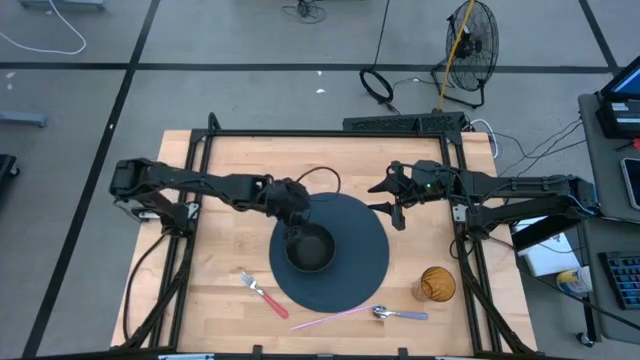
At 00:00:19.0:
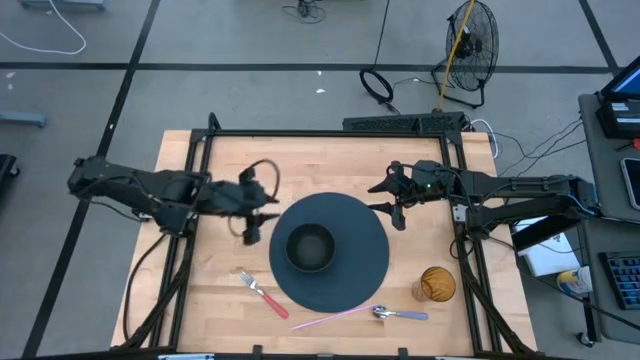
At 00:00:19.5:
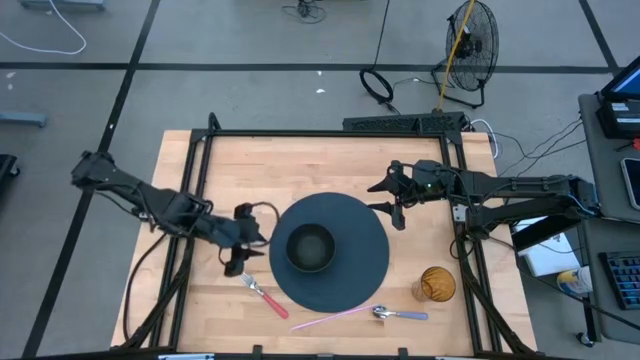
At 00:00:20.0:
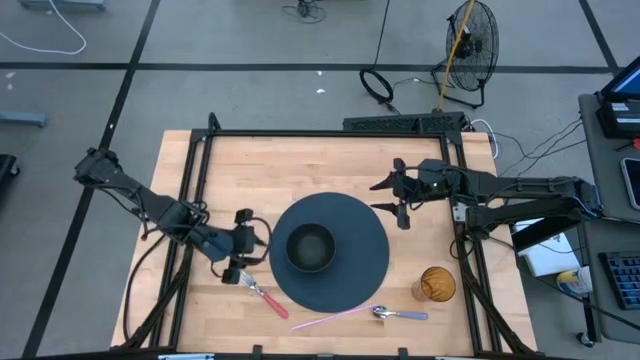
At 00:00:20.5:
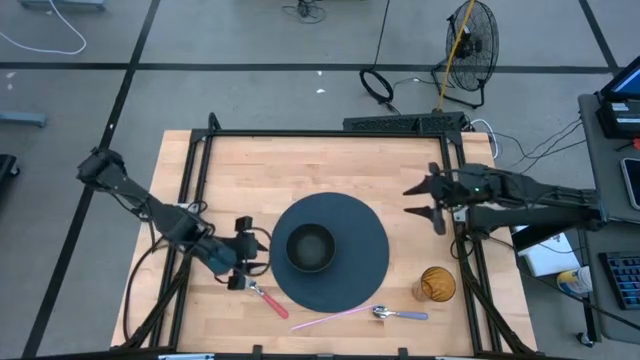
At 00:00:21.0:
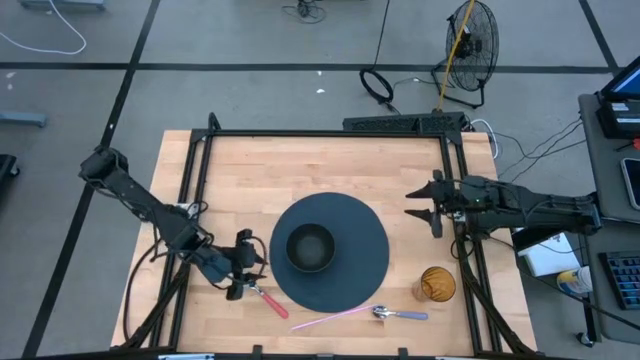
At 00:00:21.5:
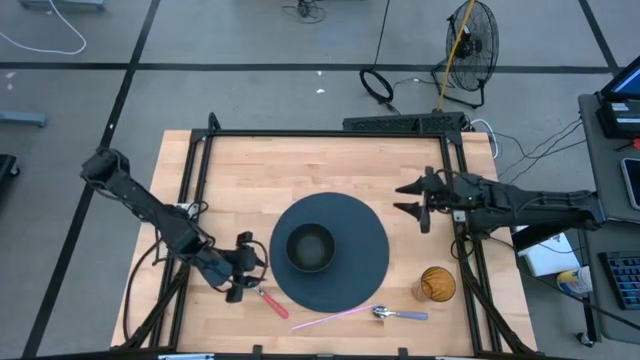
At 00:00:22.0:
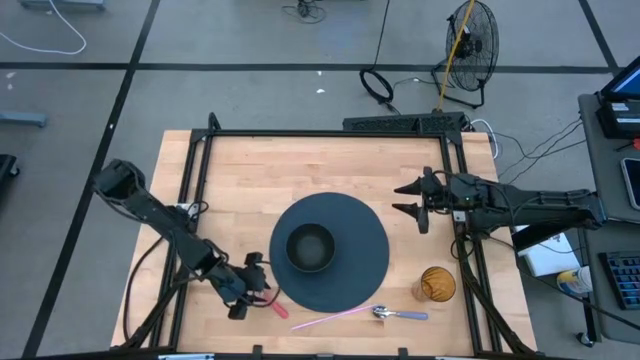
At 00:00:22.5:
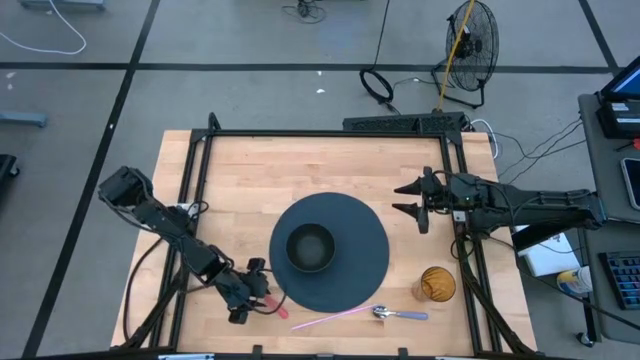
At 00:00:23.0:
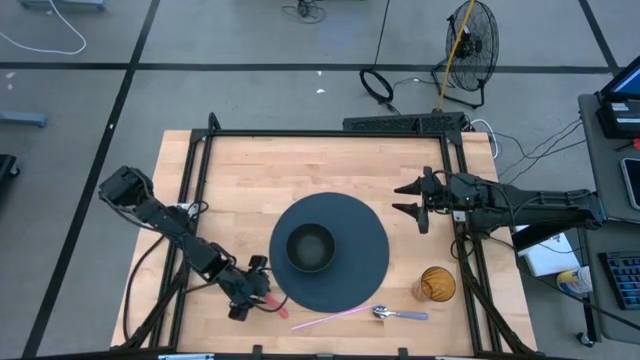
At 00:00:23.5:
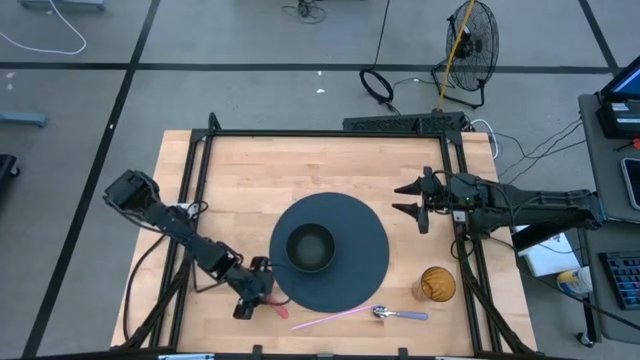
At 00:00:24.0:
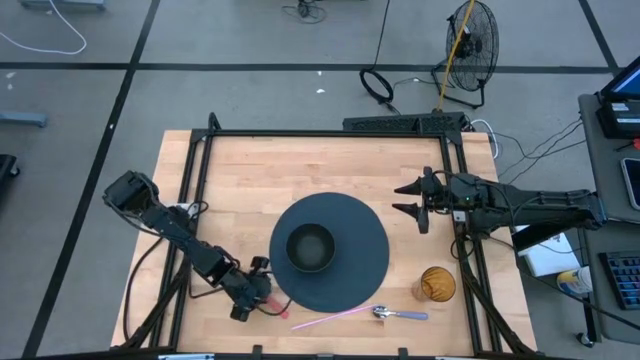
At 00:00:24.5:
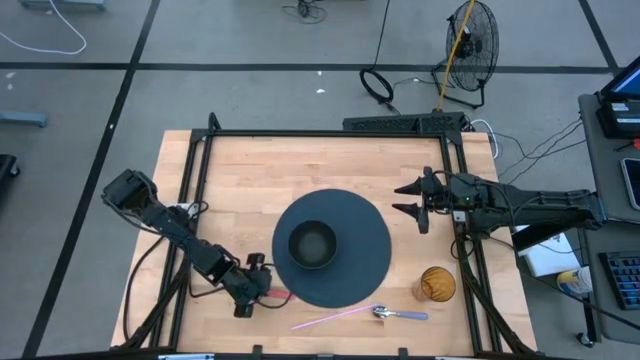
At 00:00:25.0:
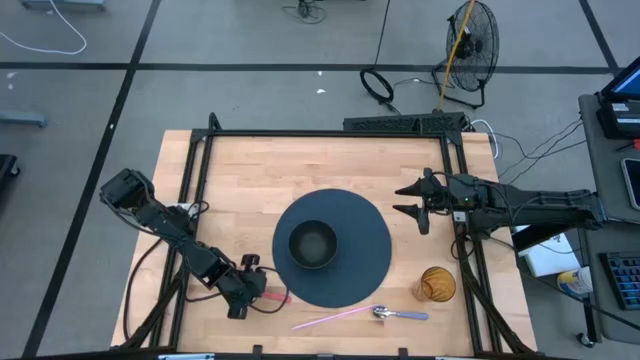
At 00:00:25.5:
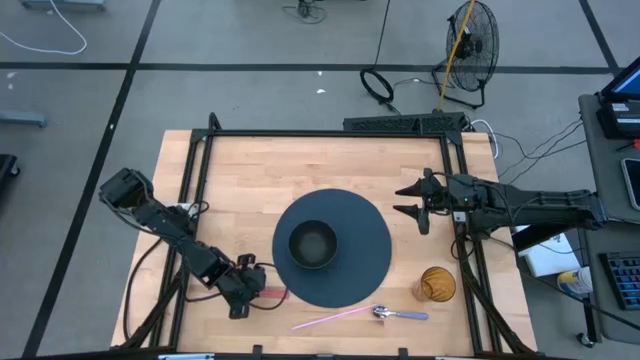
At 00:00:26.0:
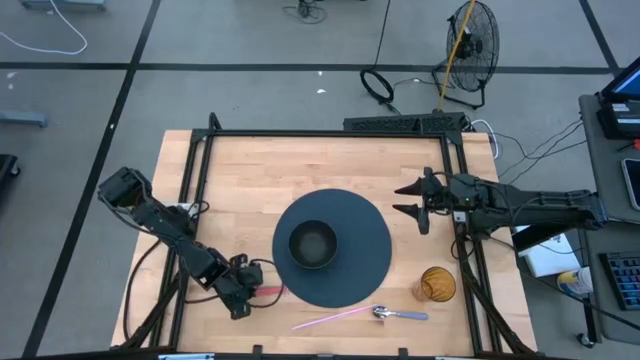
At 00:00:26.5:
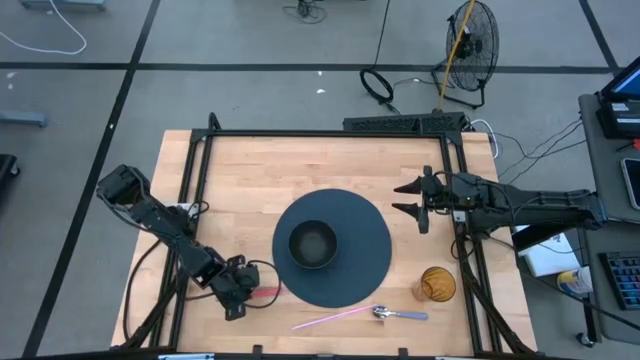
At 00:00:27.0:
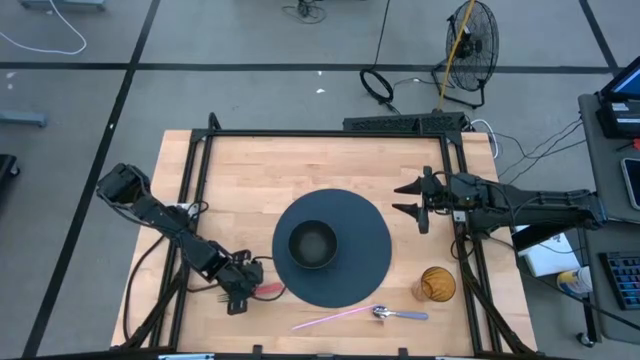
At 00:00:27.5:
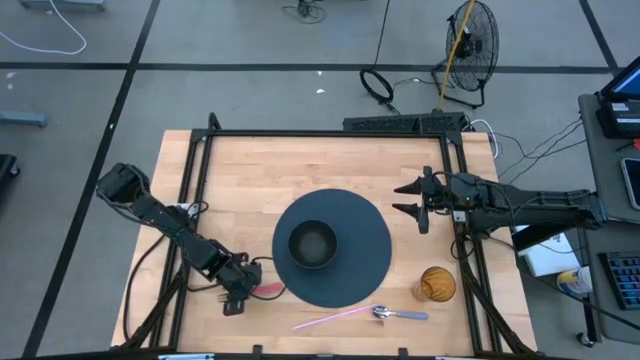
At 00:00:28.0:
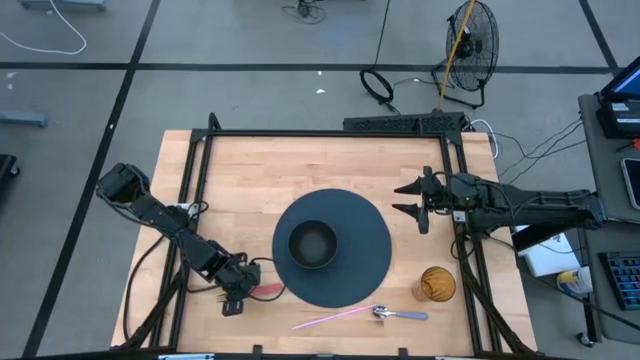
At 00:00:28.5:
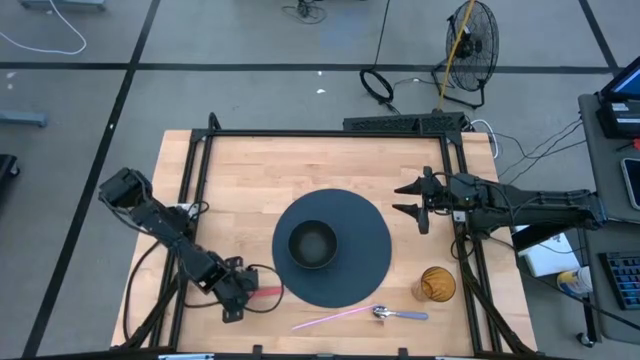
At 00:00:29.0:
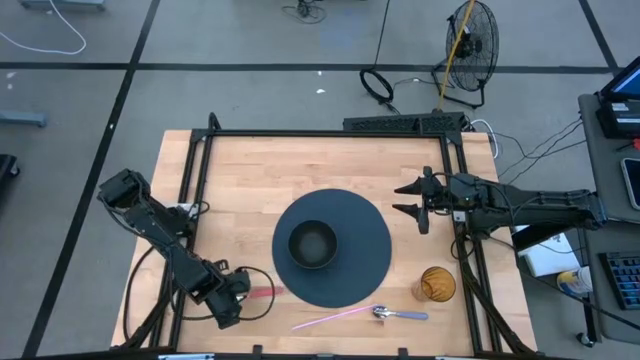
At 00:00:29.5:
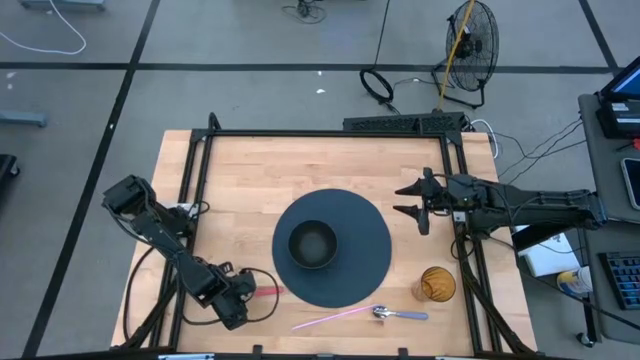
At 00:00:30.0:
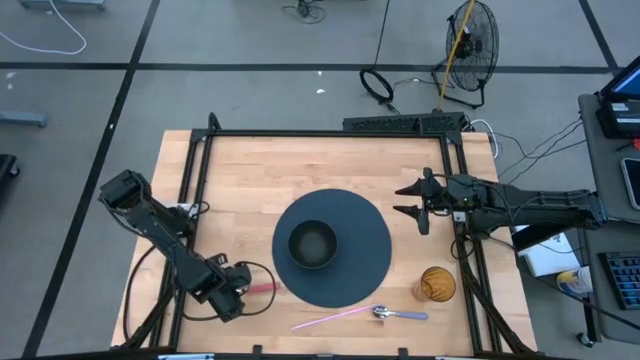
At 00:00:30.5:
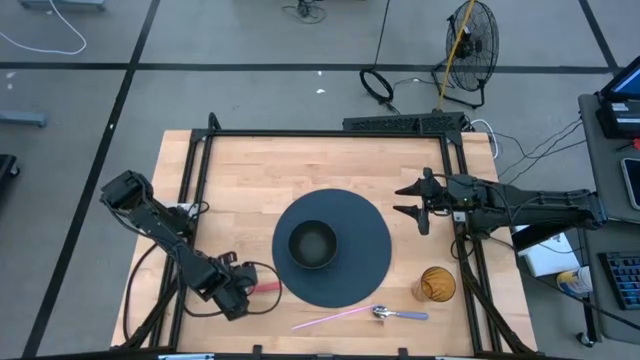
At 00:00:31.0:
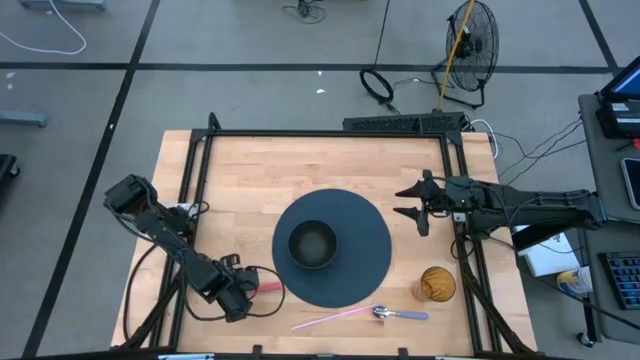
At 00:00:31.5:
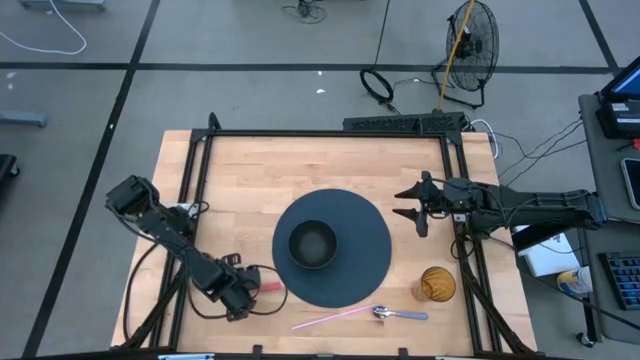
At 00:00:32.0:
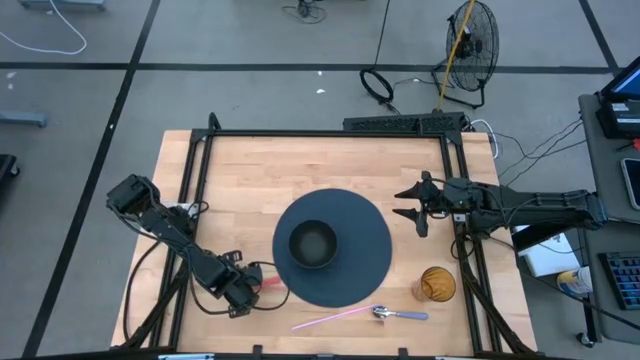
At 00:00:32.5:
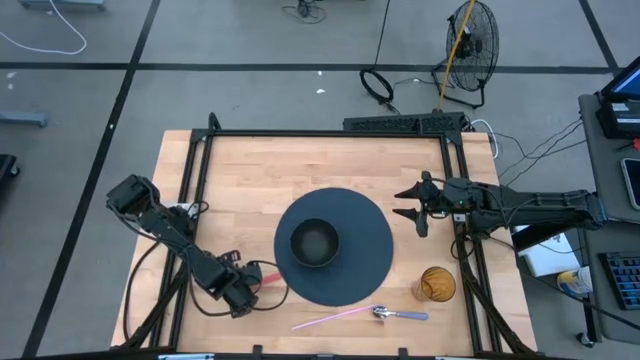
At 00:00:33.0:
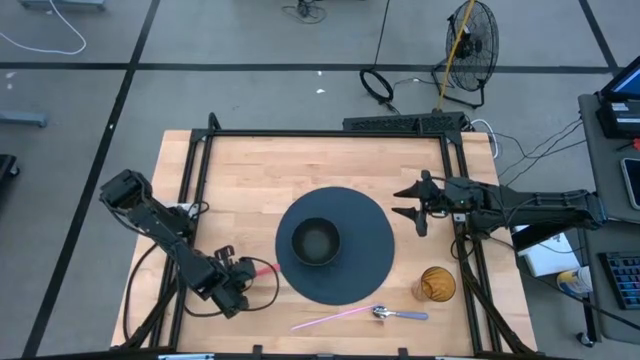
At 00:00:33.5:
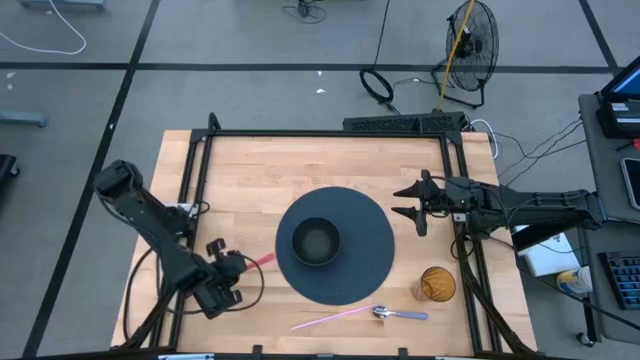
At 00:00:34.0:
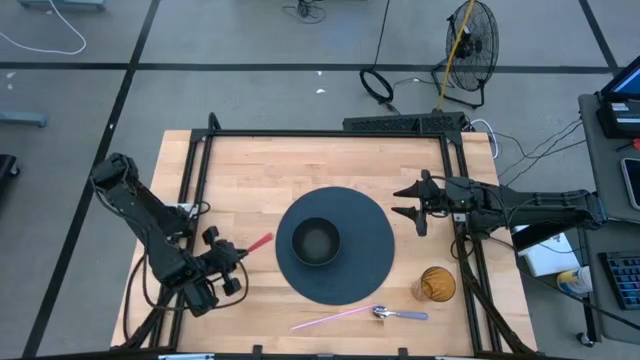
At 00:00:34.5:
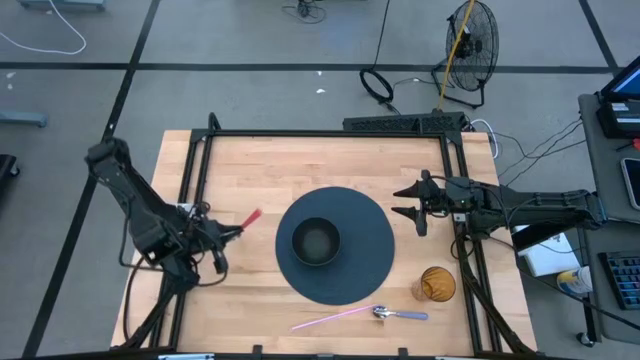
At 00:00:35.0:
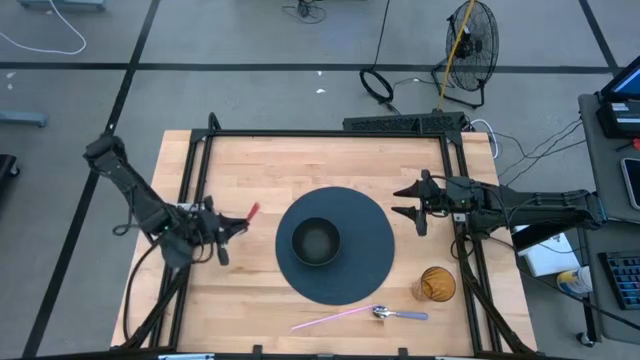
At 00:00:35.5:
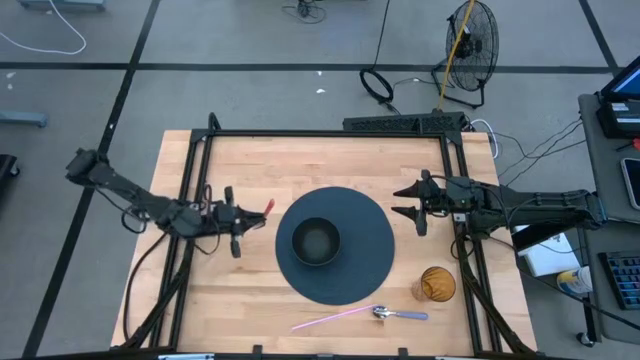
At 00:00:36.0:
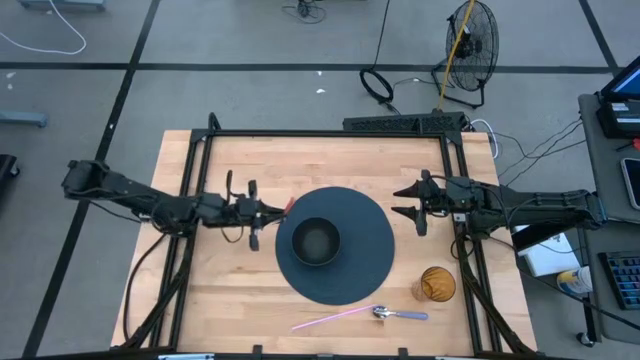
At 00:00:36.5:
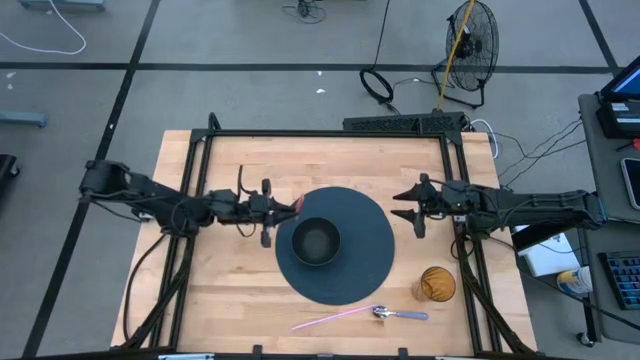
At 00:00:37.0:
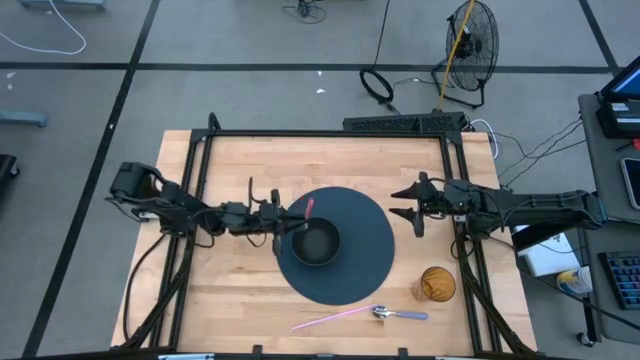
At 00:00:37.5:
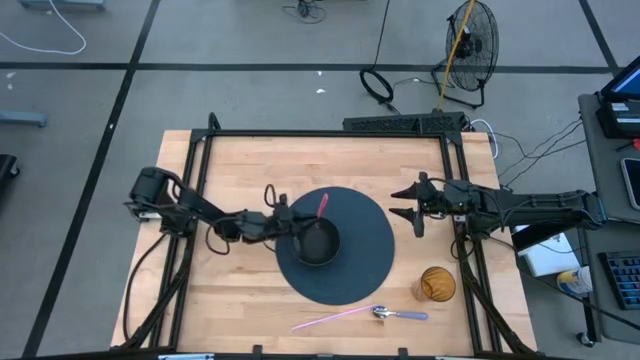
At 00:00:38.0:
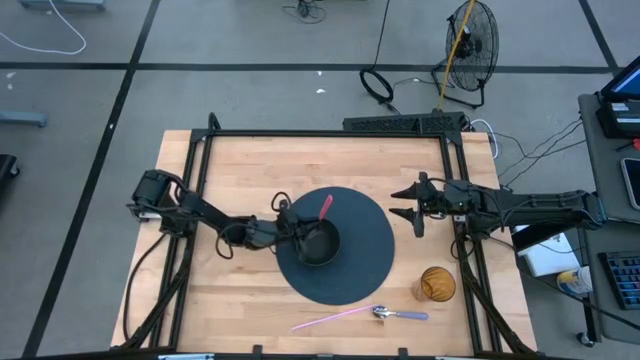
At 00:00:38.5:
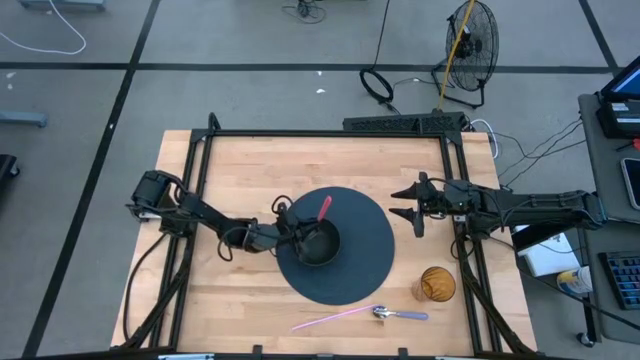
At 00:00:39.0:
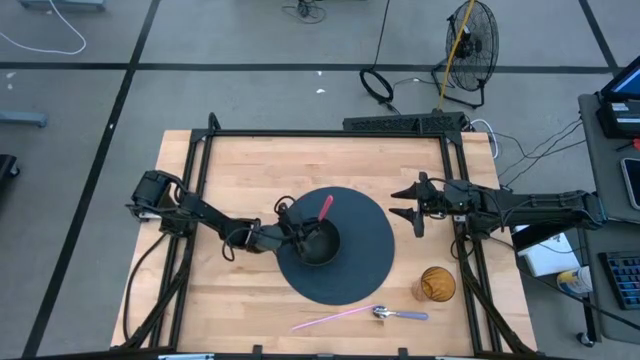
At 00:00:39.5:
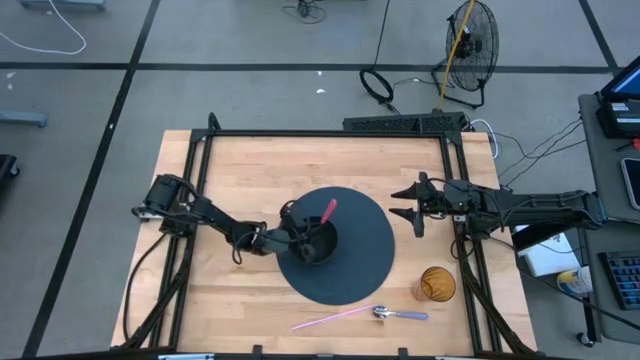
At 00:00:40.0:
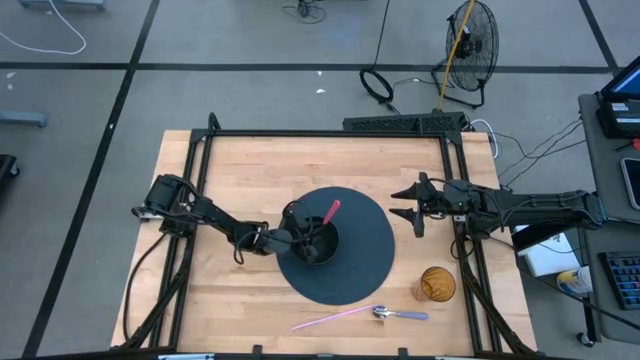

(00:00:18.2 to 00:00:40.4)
Task: Pick & Place Utensil
Put the pink fork into the black bowl
